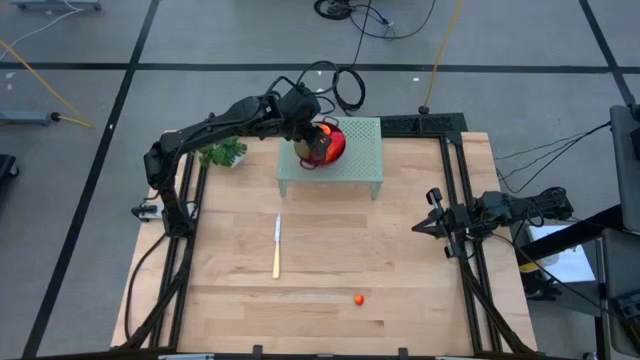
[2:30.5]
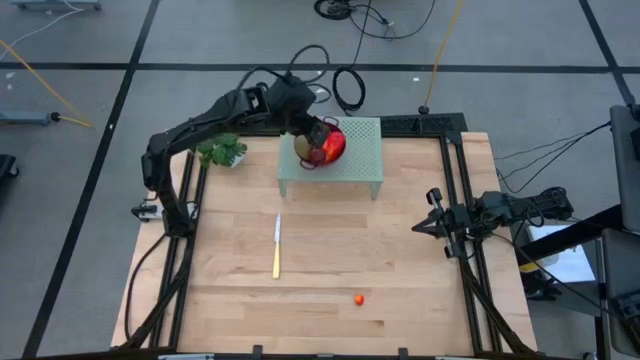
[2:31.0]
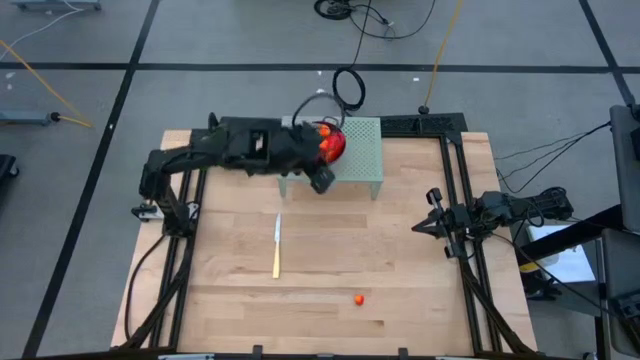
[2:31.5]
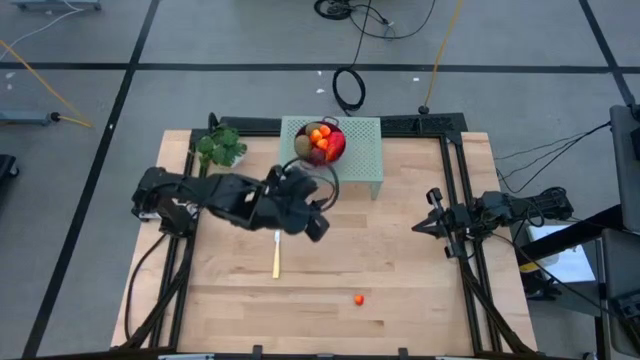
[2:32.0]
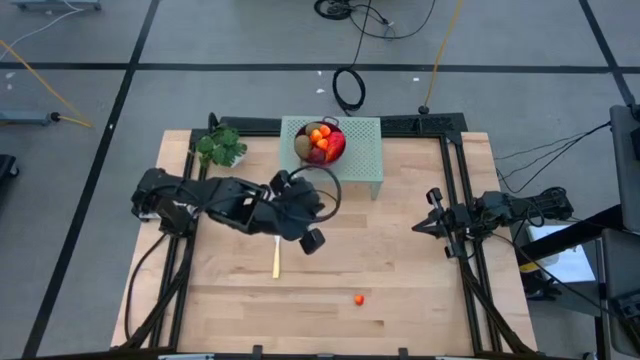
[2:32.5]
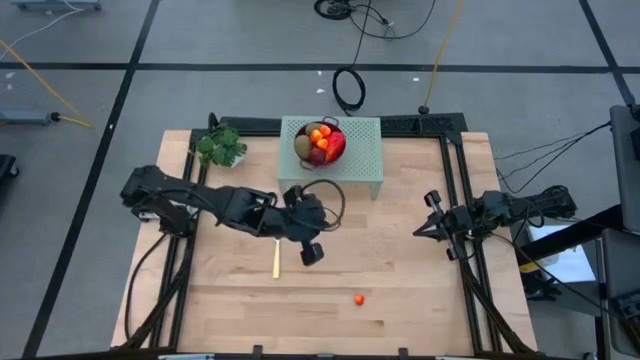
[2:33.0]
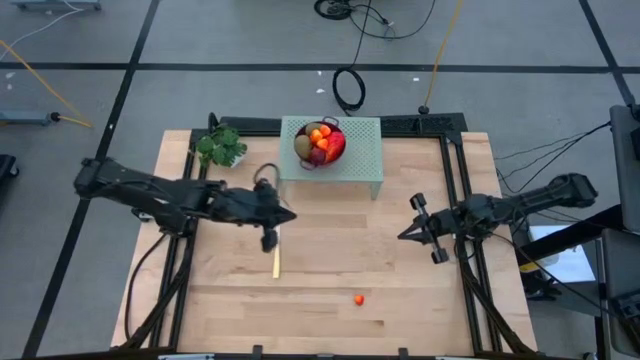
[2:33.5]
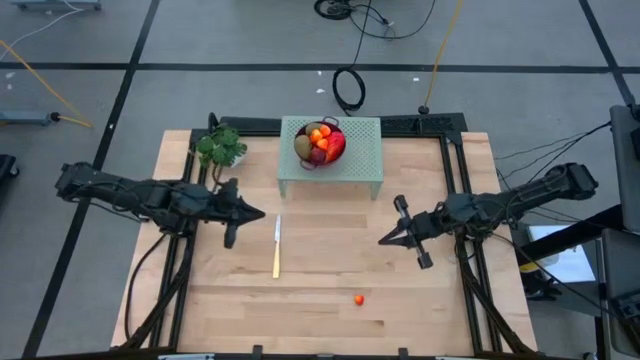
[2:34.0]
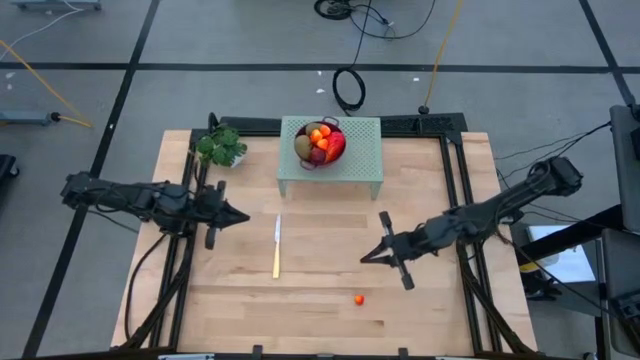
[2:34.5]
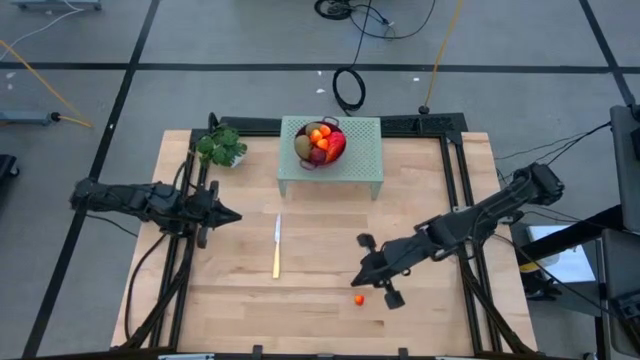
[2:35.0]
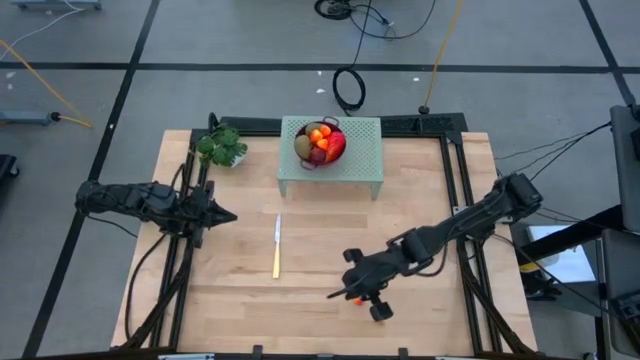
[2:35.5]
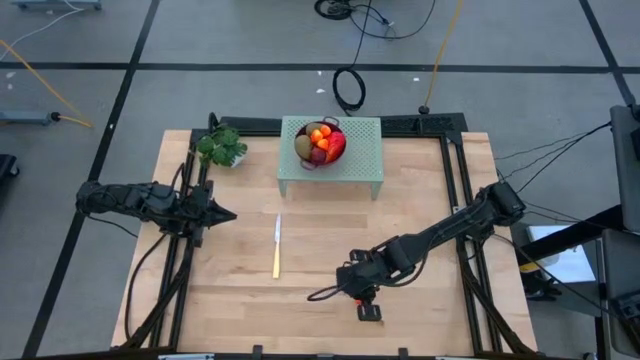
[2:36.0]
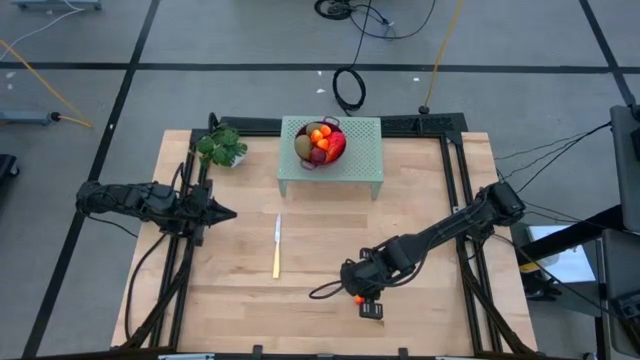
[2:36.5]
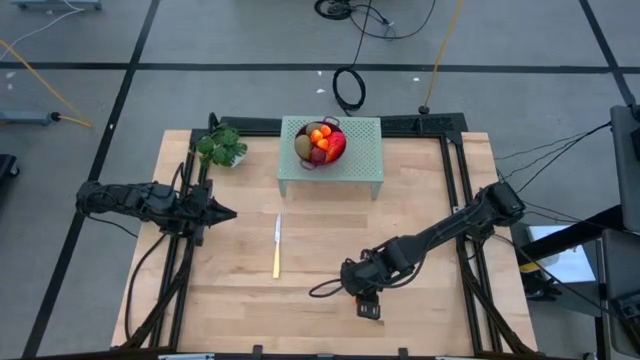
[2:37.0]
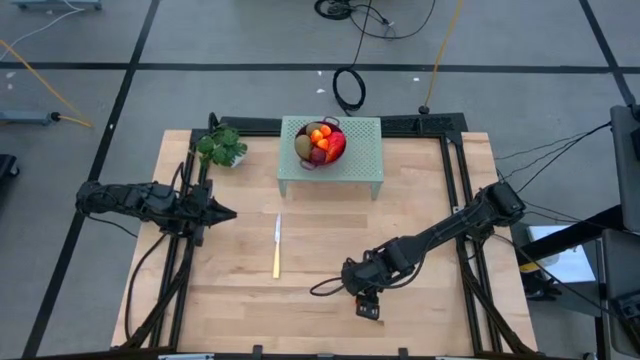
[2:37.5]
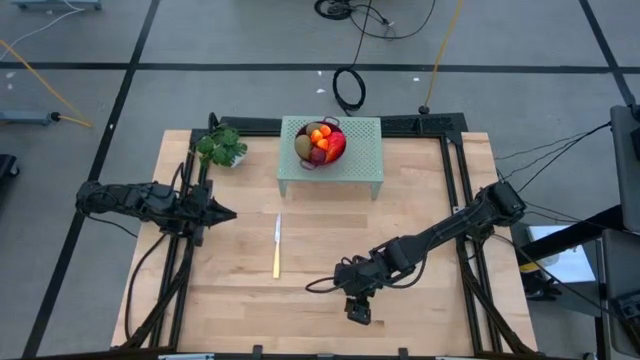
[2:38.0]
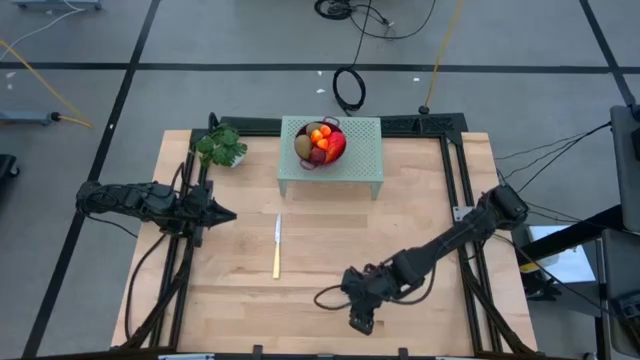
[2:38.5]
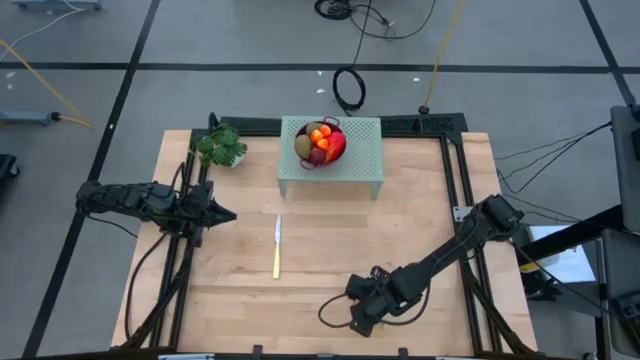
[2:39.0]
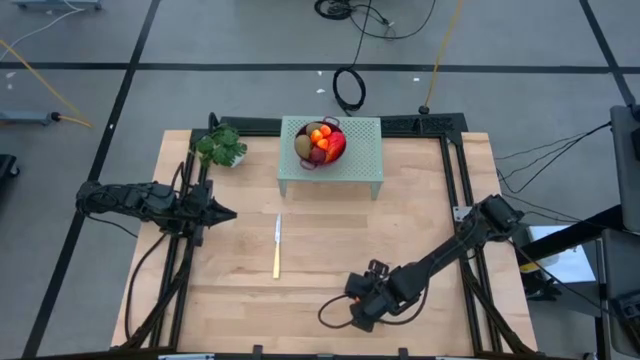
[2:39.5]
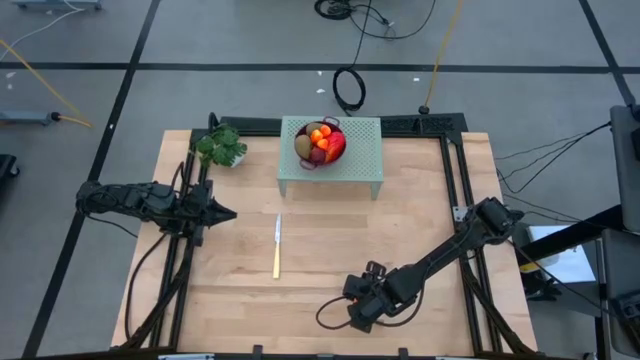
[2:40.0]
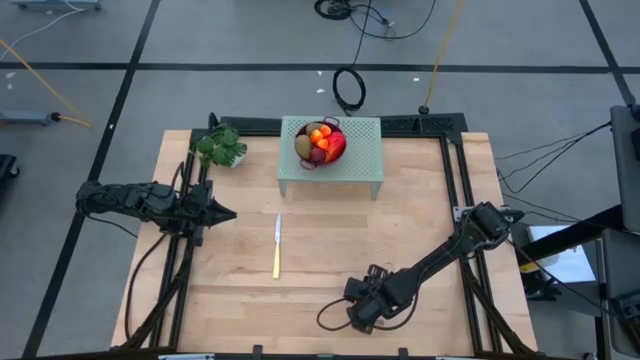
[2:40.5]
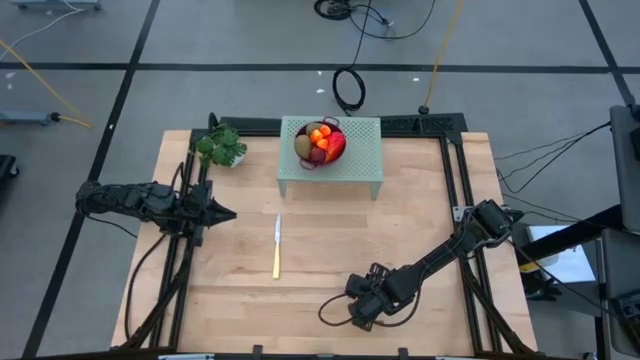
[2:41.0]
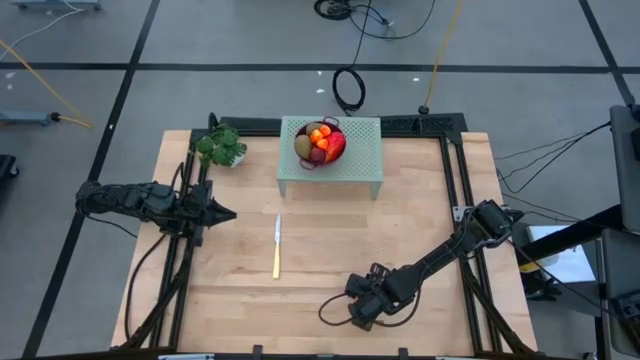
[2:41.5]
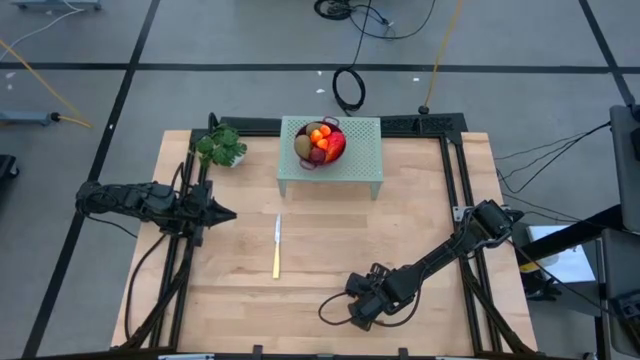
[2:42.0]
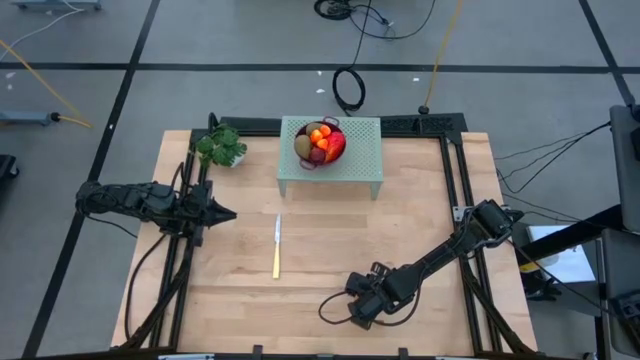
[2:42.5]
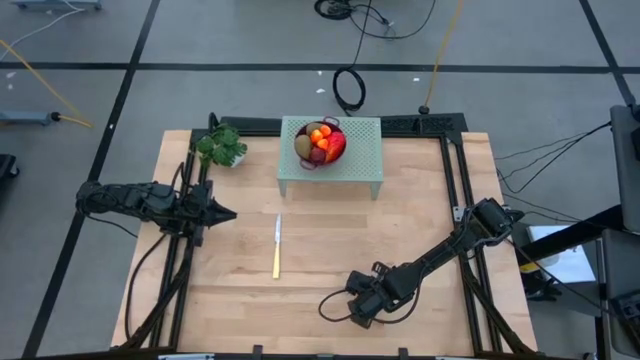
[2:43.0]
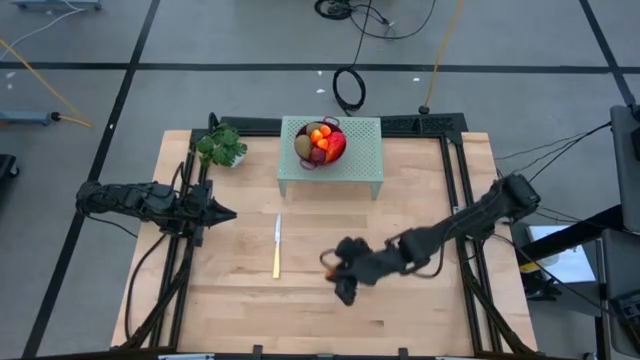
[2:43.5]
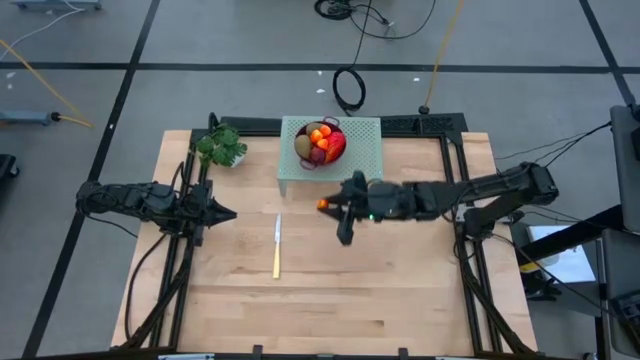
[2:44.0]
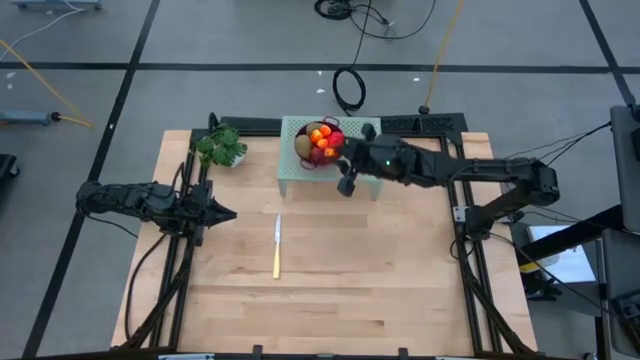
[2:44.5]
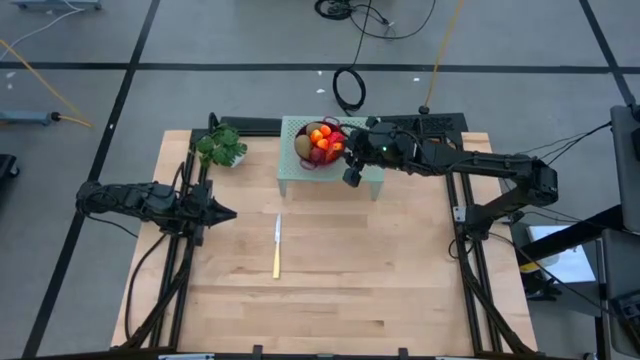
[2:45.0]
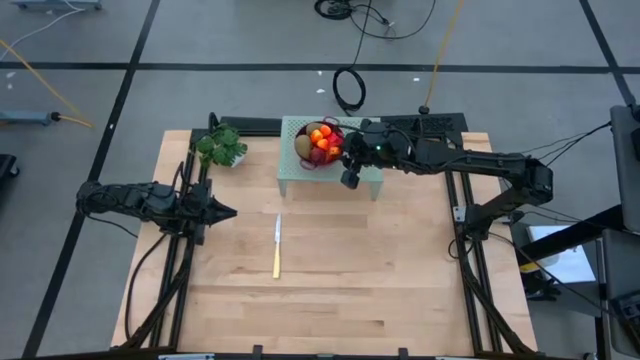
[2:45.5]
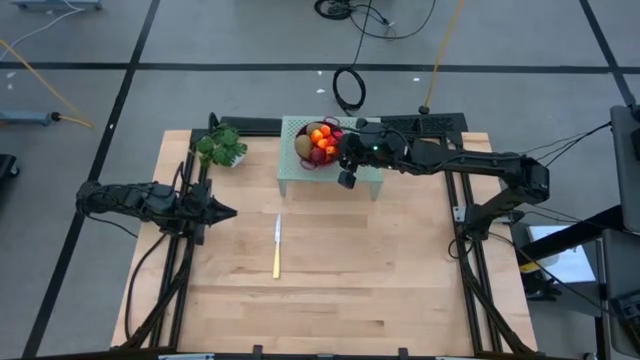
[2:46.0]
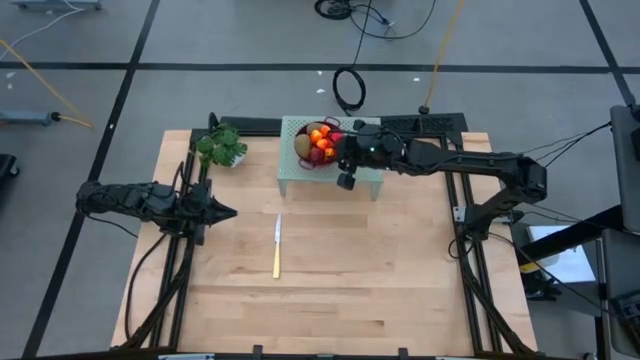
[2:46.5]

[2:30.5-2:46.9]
Task: Pick & Place Fruit
Put the pear into the strainer bowl

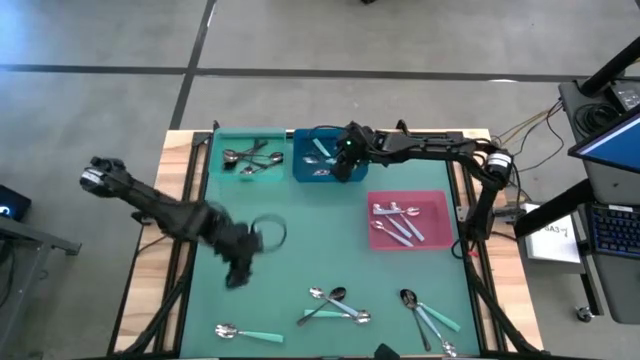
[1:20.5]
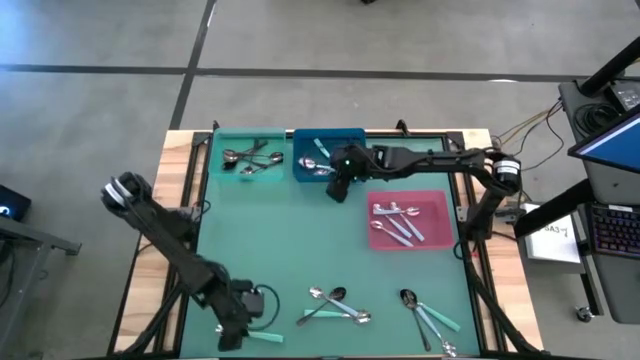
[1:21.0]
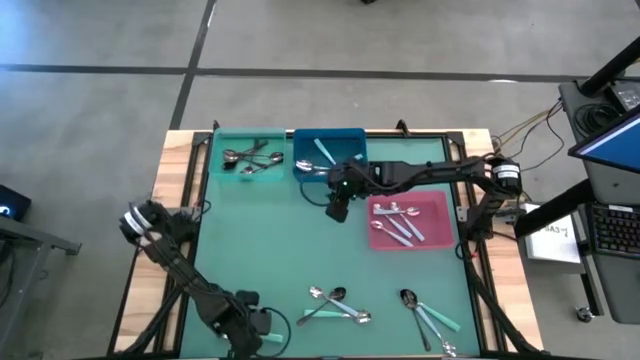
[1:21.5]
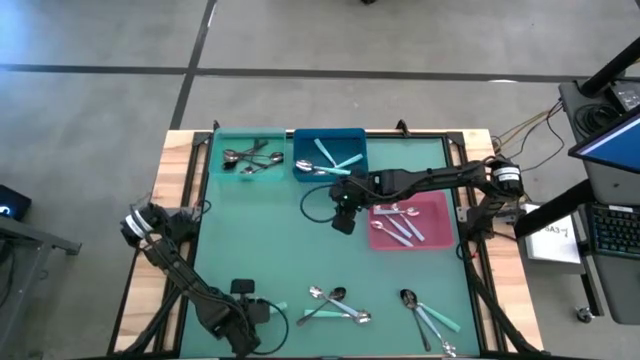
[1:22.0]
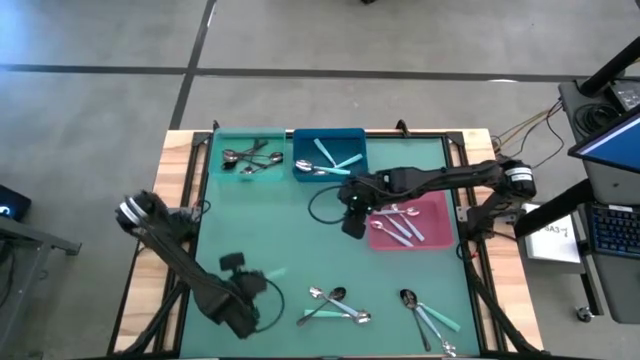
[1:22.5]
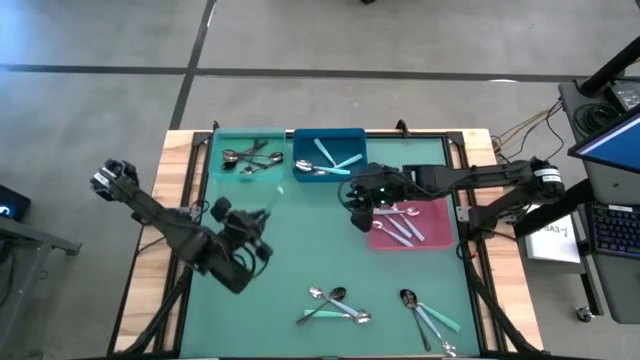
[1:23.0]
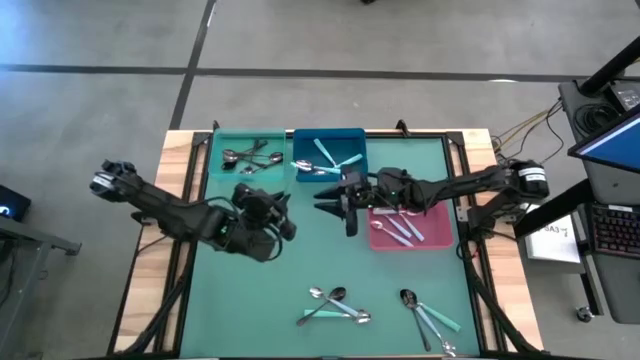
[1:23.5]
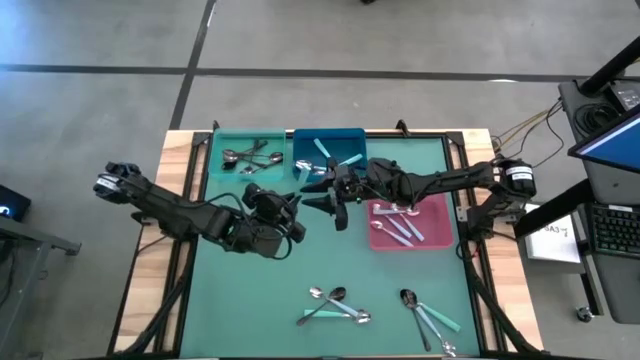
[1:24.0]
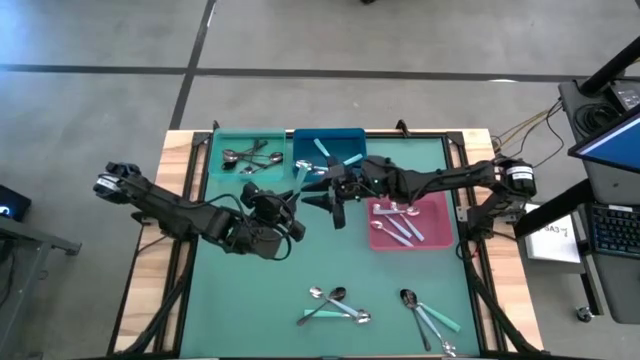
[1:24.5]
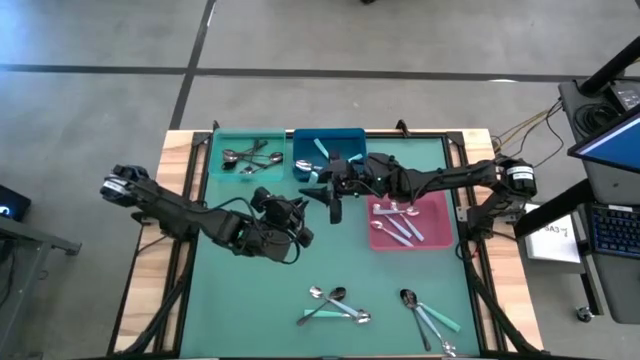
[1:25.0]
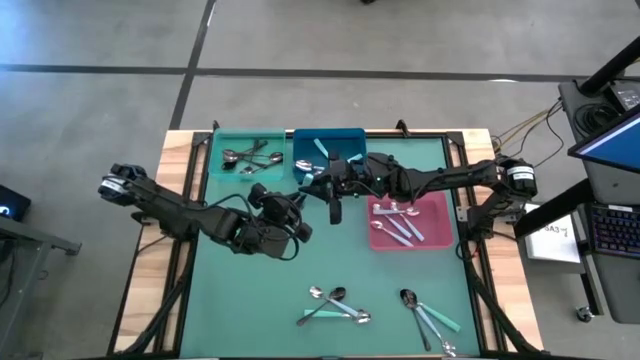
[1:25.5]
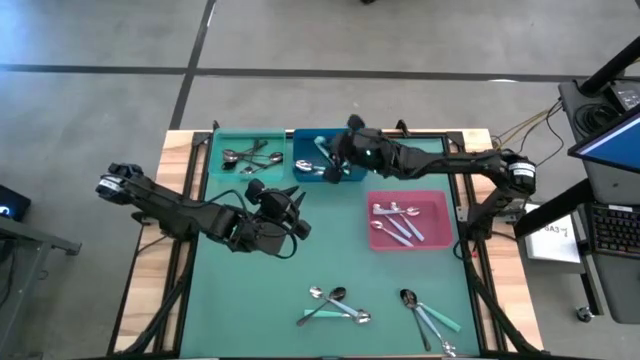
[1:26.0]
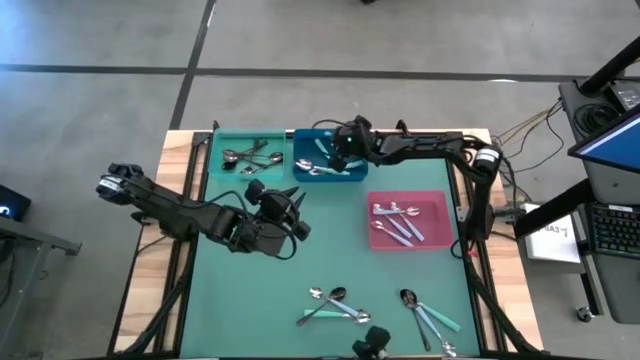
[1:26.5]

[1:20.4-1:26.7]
Task: Sort silverware by color (type)
Put the green spoon into the blue bin
